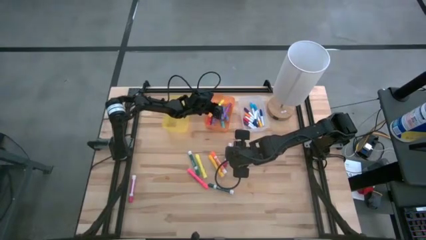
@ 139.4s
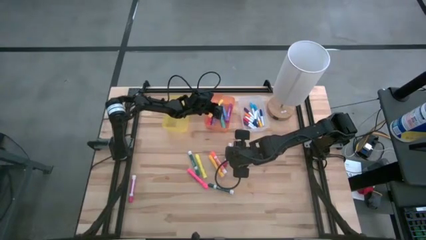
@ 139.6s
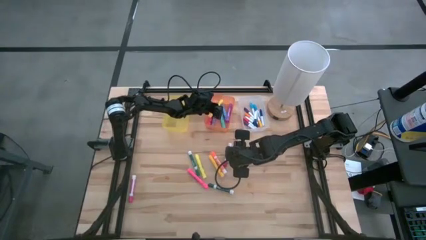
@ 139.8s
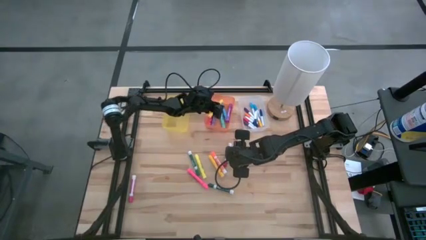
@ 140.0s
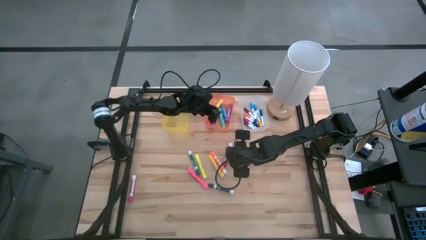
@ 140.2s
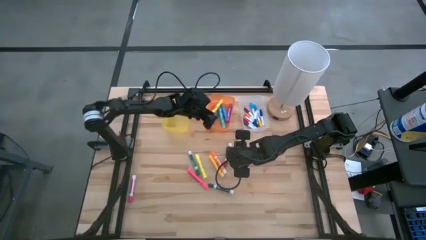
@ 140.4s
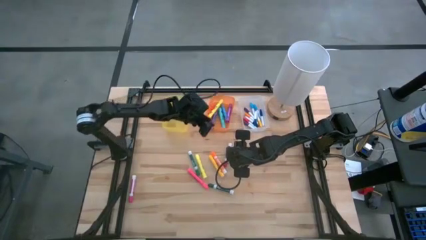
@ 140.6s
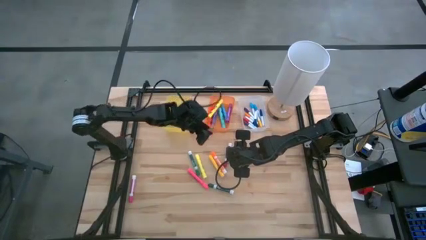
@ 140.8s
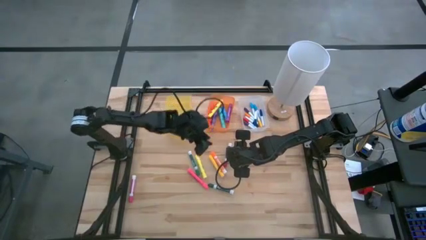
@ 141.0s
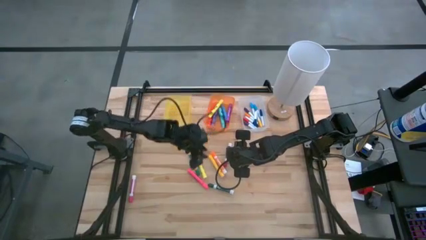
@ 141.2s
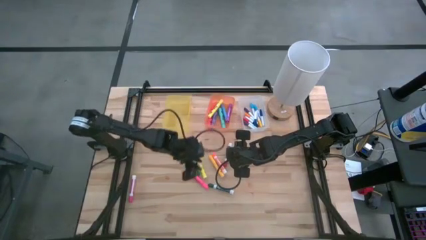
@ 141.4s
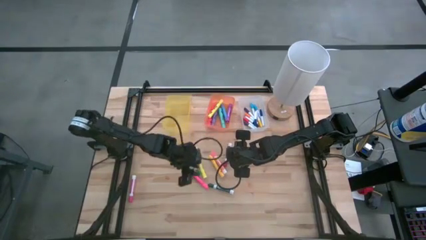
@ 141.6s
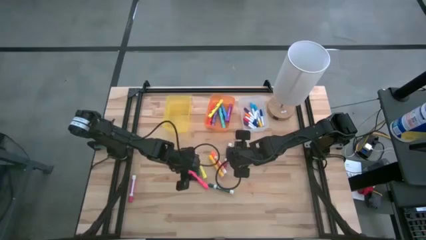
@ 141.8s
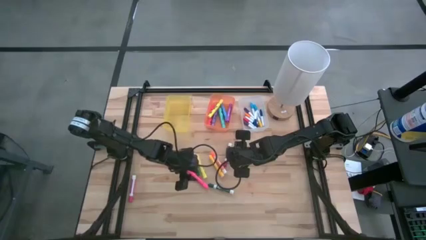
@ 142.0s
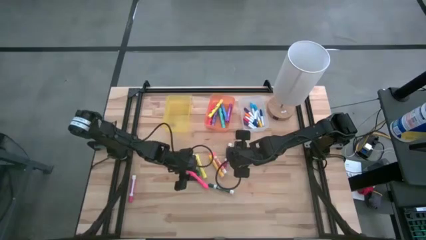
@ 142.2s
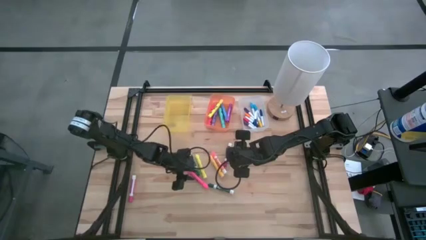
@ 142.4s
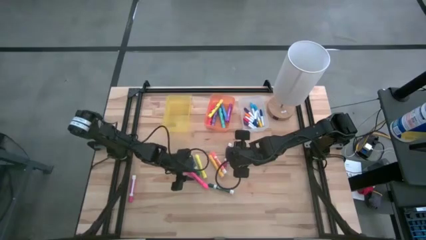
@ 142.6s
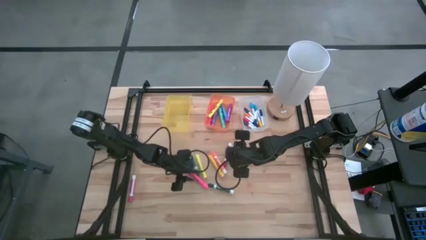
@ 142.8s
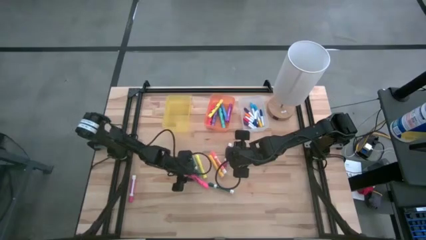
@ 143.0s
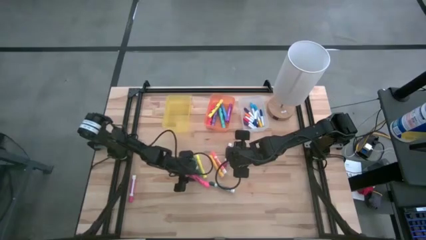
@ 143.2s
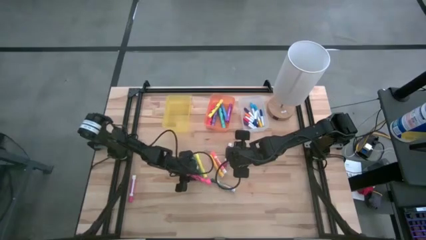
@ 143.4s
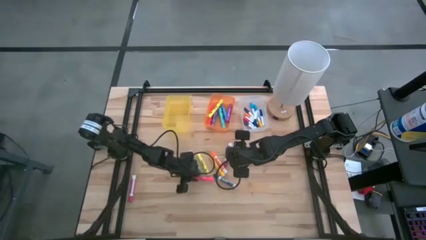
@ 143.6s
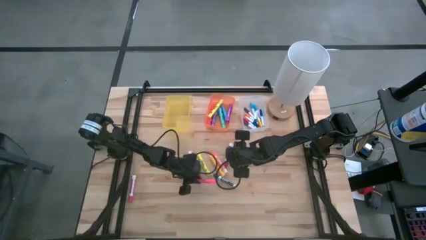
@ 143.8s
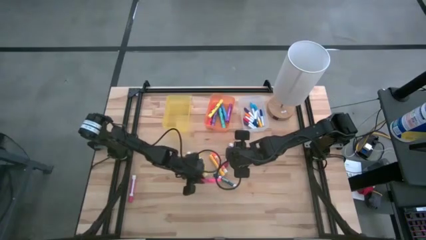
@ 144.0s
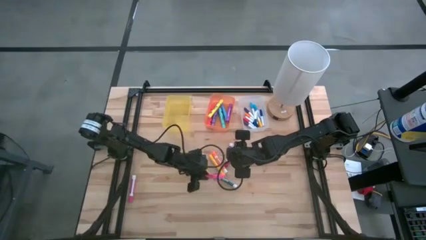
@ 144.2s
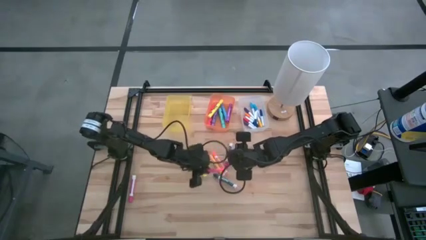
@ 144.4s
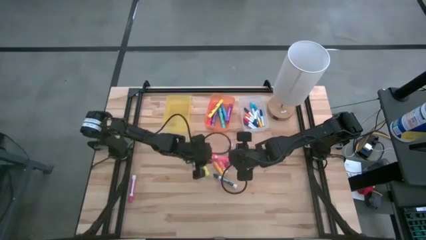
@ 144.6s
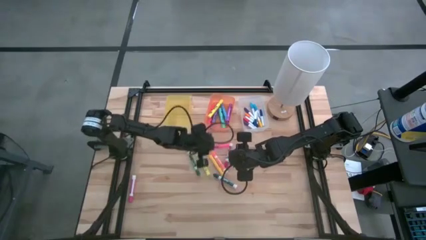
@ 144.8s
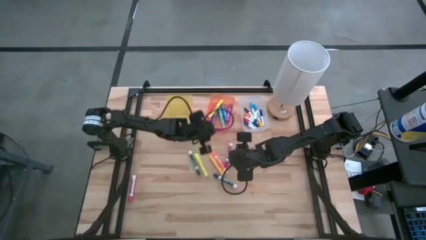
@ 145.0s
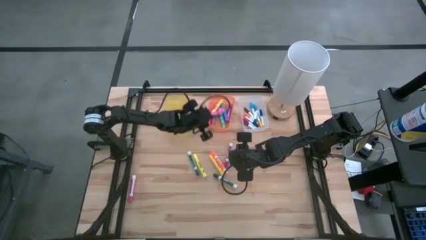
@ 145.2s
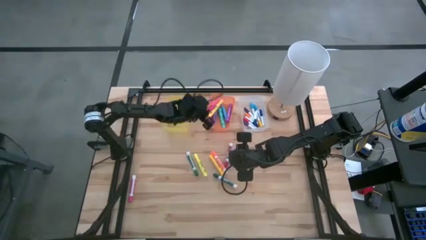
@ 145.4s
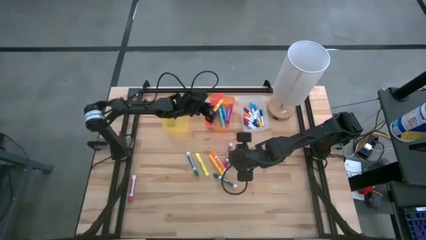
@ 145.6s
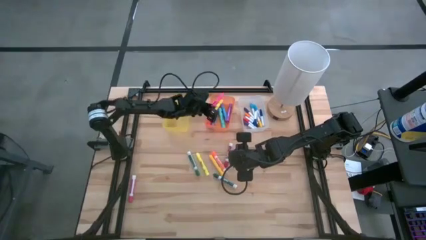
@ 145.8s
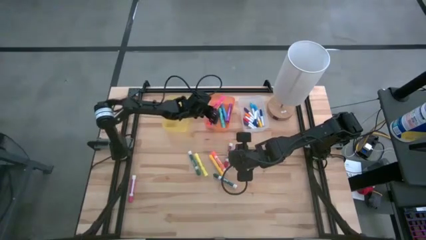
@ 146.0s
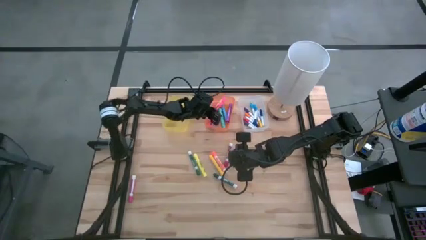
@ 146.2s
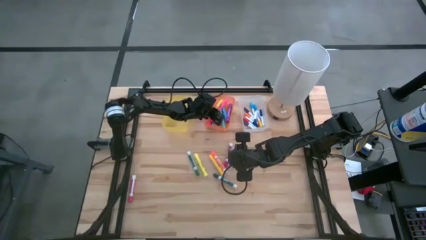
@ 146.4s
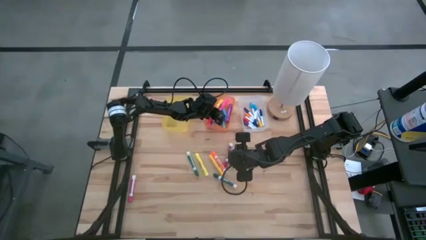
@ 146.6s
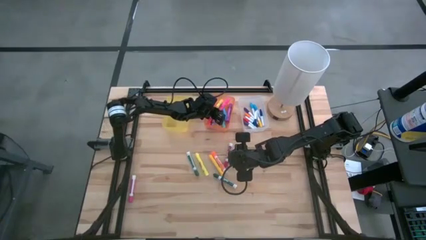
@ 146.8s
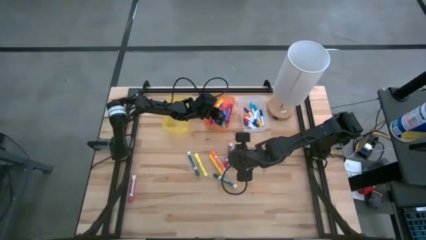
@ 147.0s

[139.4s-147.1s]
Task: Pick & Place Markers
Put the pink highlighter into the orange bin

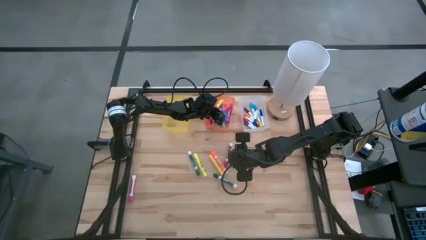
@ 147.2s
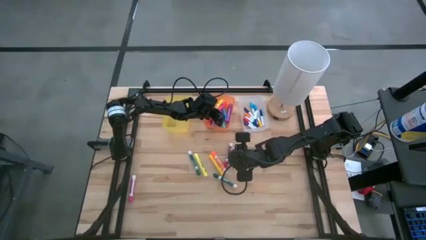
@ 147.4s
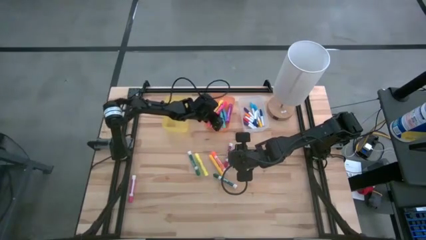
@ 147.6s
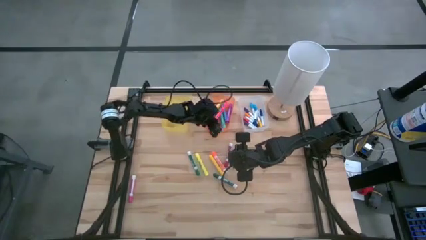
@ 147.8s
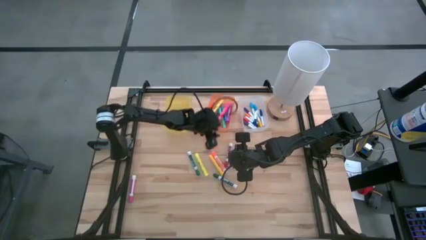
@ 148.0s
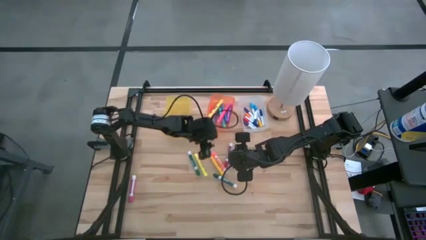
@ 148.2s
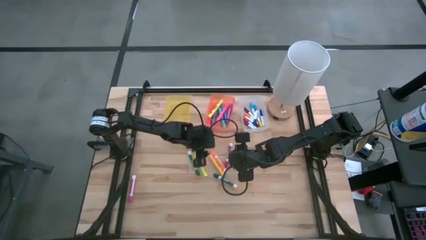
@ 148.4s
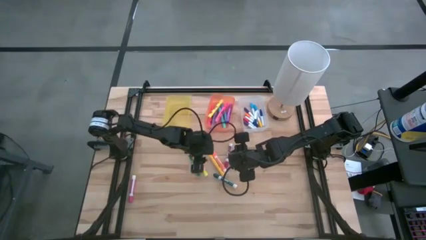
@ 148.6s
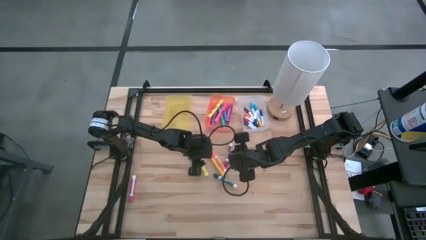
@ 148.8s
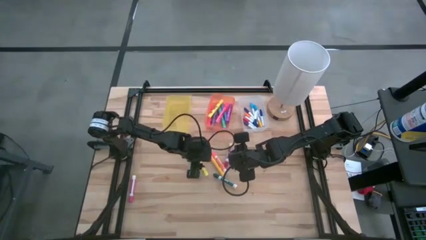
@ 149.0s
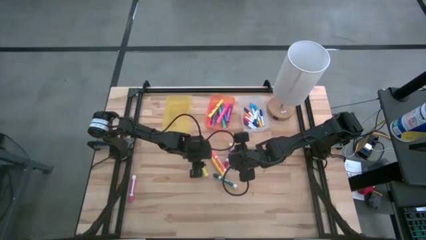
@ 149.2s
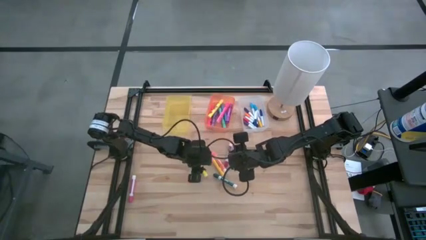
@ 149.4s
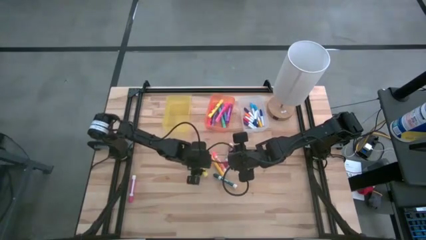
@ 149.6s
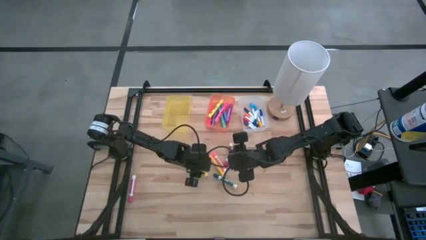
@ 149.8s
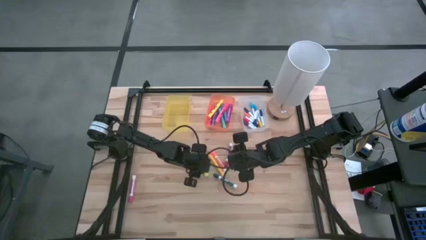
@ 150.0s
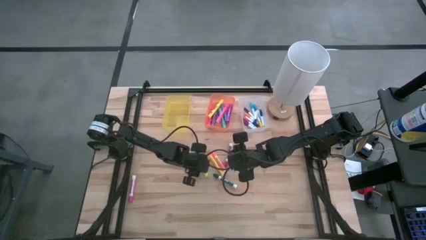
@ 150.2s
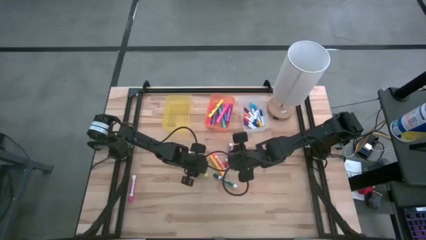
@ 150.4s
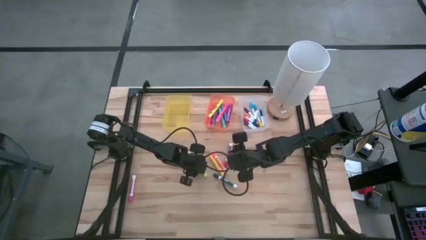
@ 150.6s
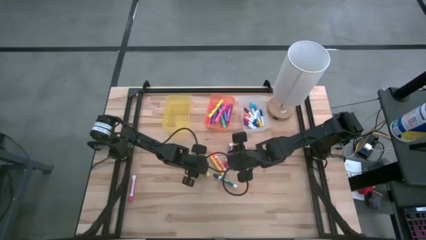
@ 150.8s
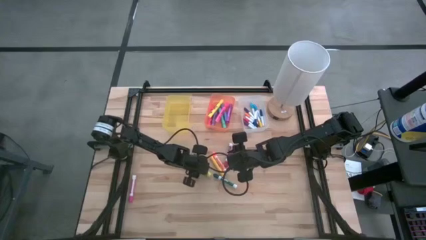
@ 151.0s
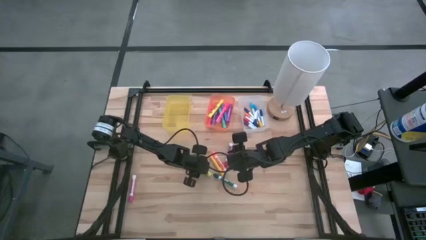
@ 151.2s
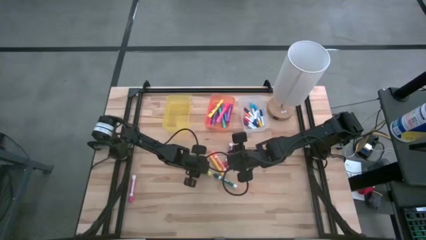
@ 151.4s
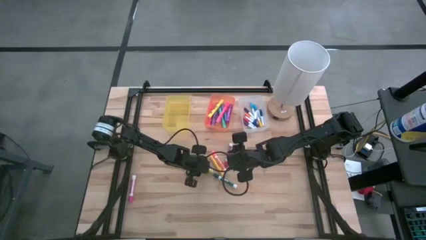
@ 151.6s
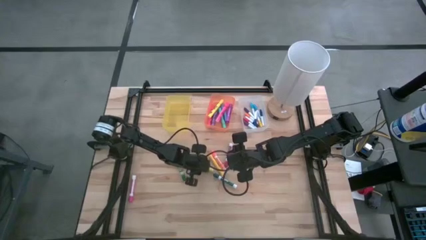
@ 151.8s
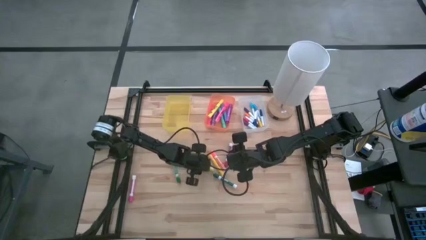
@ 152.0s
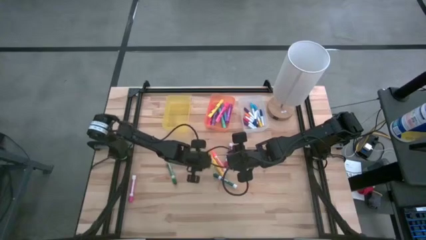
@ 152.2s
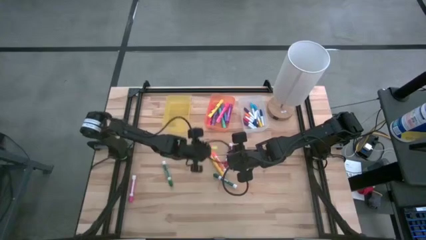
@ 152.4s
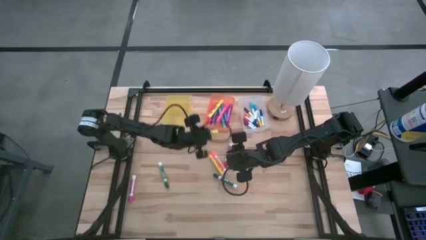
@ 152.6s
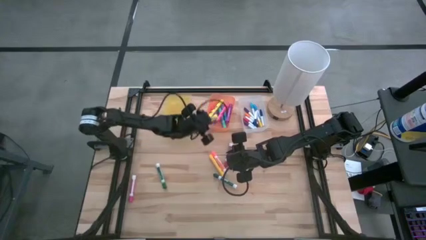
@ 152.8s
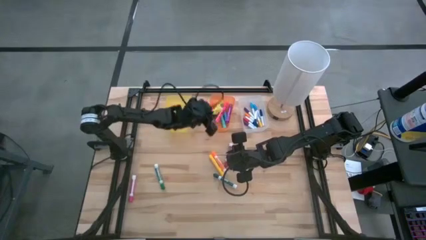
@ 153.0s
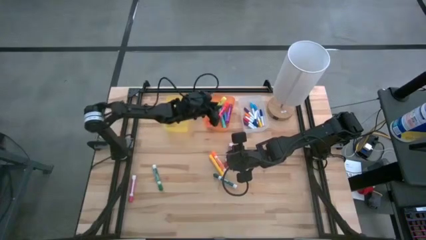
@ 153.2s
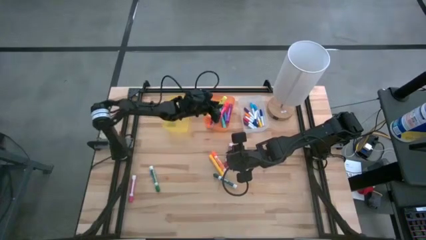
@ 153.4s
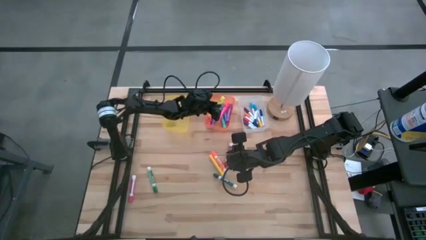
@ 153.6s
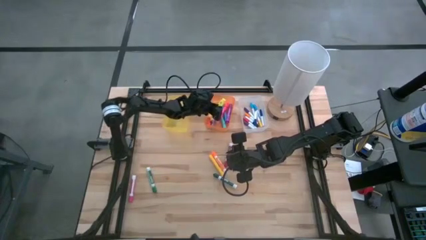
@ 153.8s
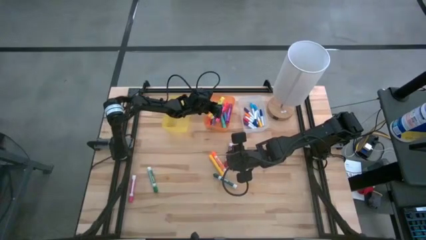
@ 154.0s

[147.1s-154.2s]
Put the yellow highlighter into the orange bin

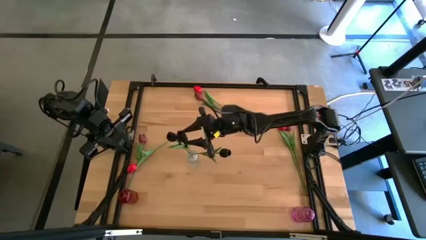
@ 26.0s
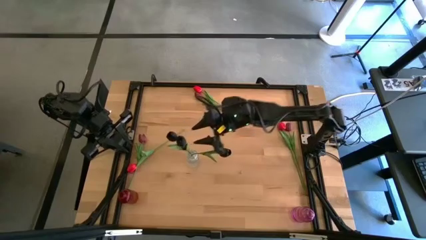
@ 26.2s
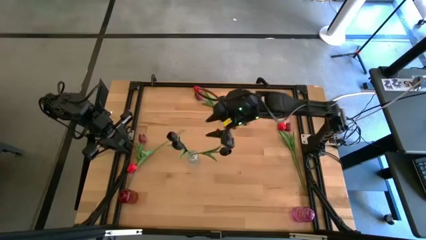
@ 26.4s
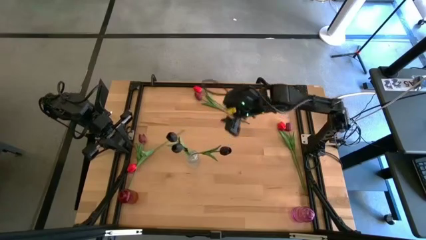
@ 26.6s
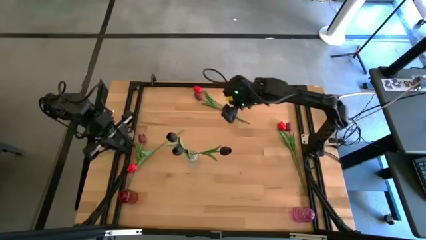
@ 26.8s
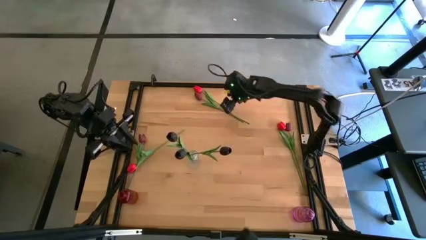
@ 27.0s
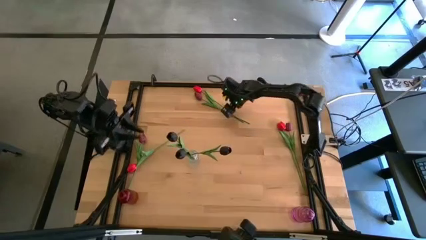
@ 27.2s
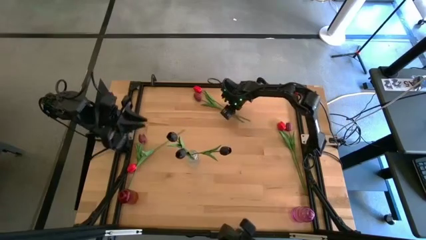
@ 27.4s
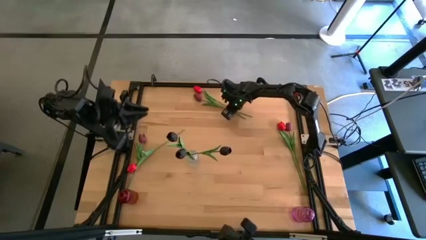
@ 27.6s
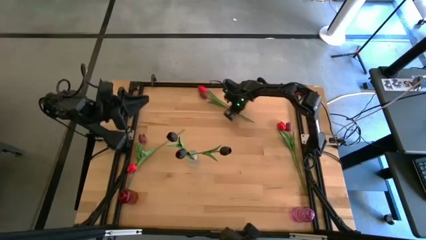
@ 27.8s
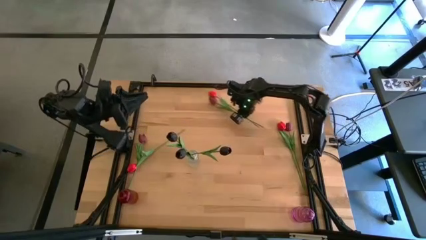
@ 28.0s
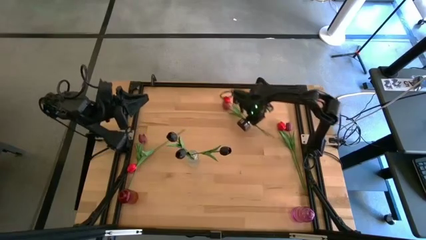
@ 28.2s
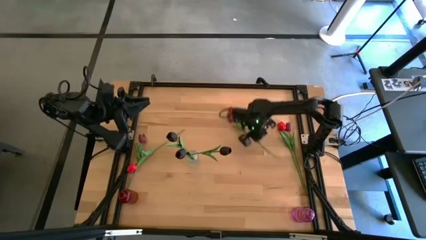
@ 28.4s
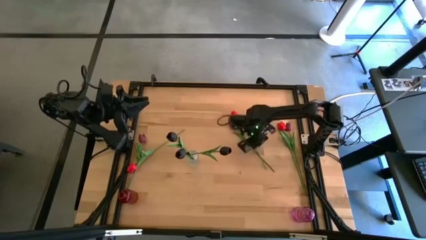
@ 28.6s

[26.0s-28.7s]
Task: Sort flowers into vase by color
Put the red flower into the violet transparent vase
